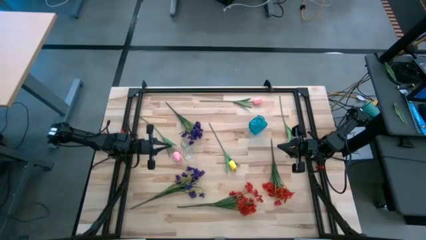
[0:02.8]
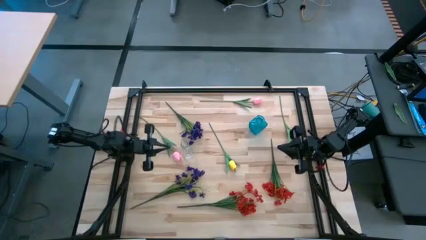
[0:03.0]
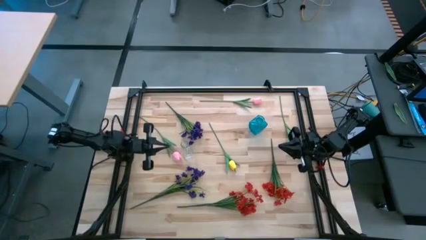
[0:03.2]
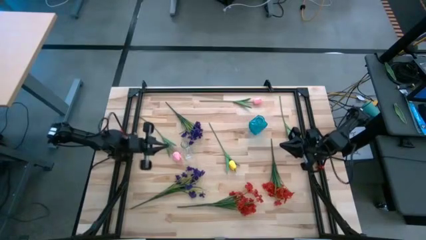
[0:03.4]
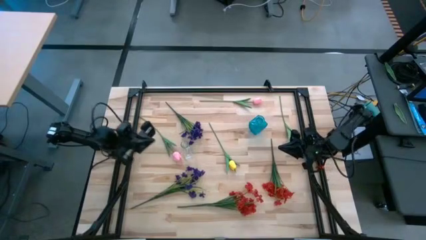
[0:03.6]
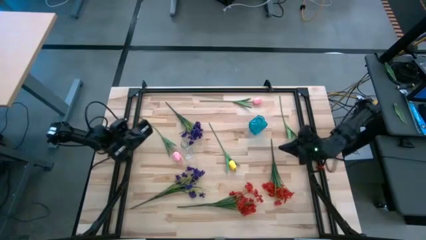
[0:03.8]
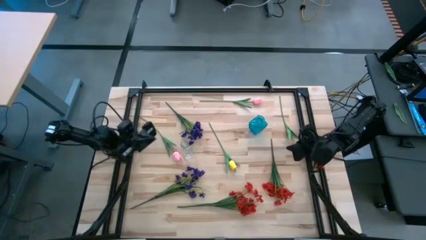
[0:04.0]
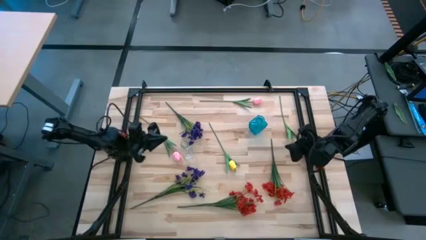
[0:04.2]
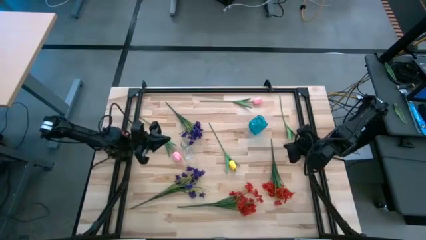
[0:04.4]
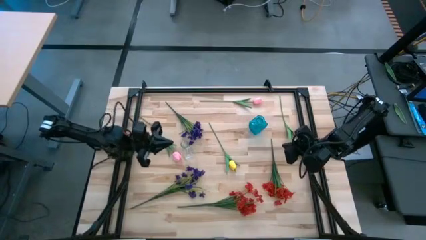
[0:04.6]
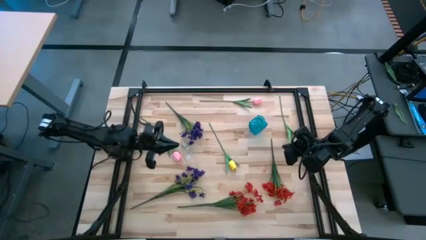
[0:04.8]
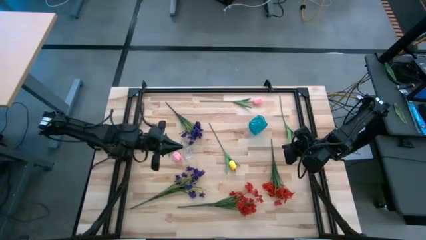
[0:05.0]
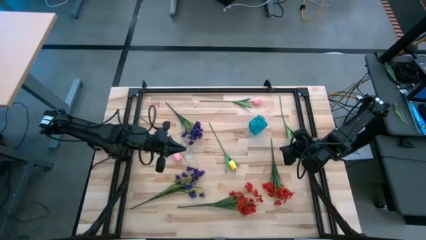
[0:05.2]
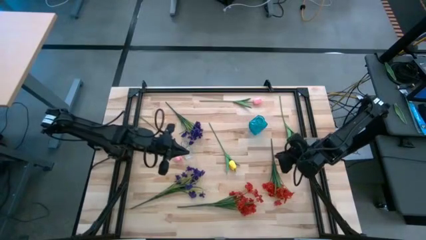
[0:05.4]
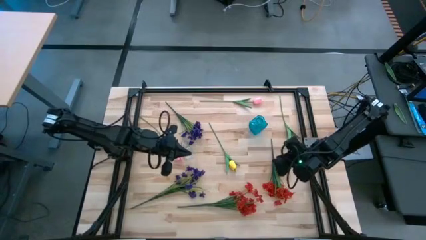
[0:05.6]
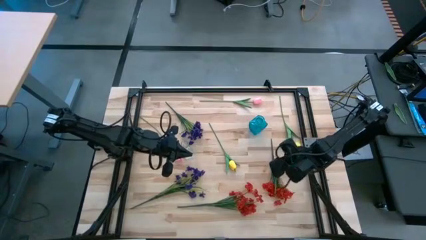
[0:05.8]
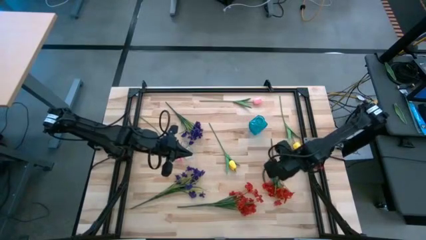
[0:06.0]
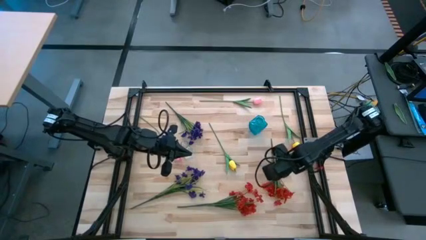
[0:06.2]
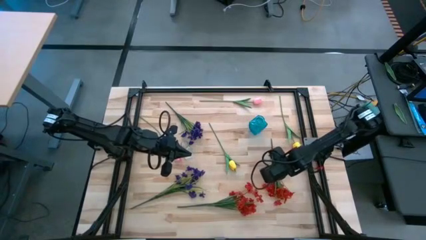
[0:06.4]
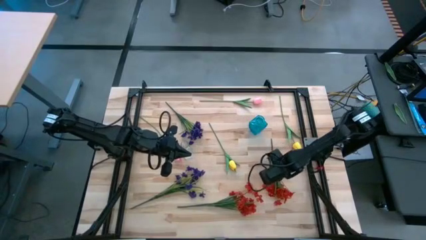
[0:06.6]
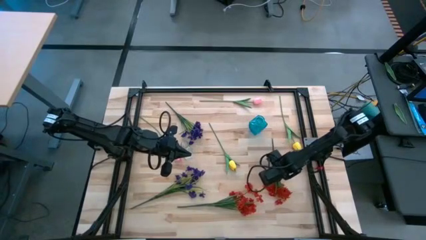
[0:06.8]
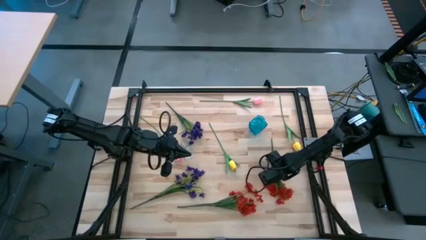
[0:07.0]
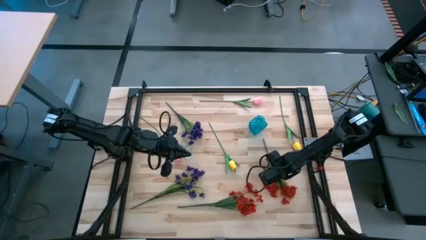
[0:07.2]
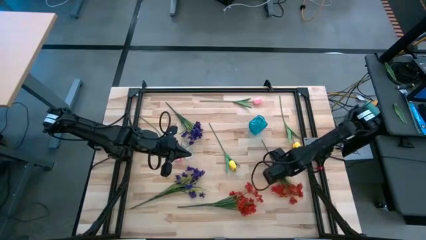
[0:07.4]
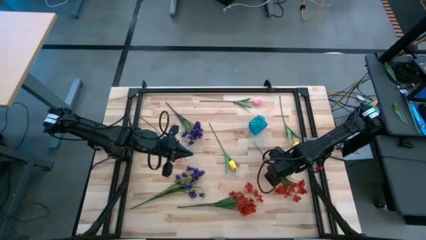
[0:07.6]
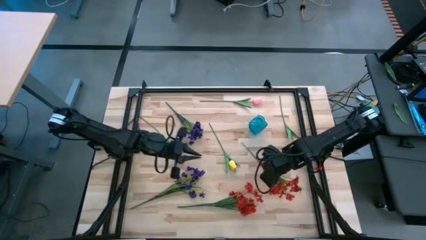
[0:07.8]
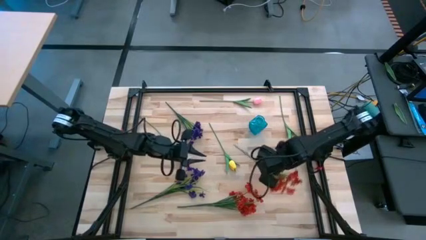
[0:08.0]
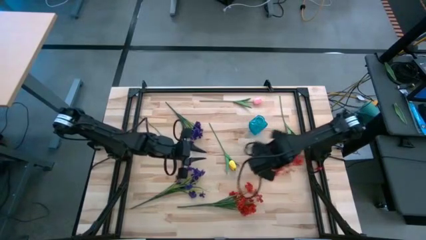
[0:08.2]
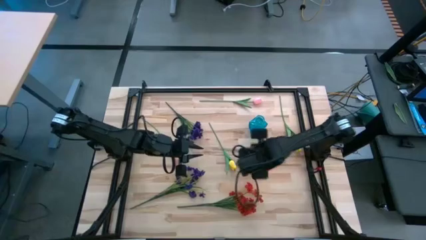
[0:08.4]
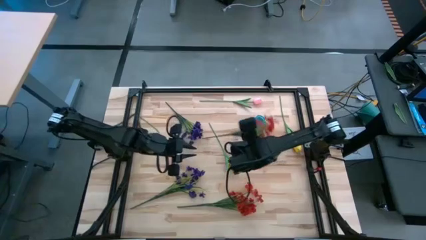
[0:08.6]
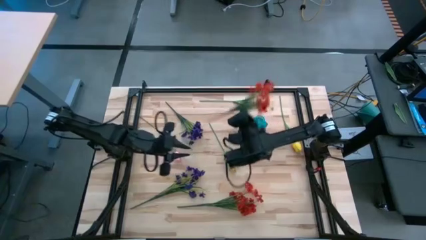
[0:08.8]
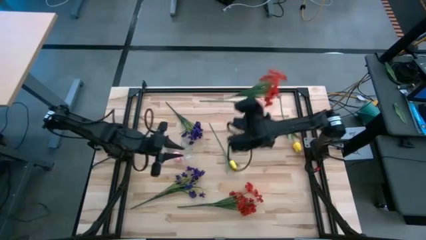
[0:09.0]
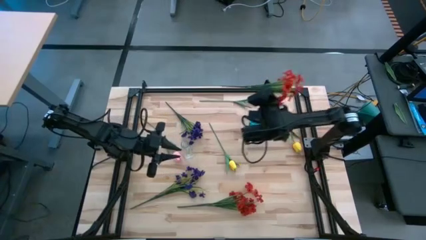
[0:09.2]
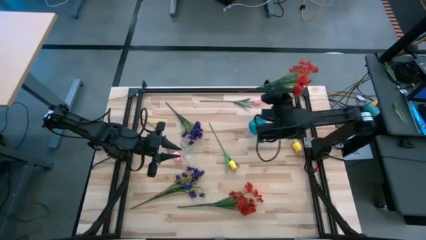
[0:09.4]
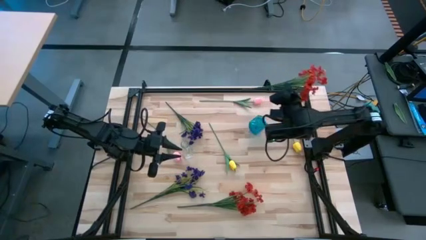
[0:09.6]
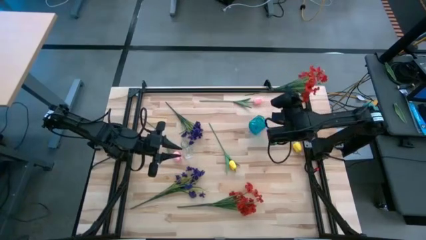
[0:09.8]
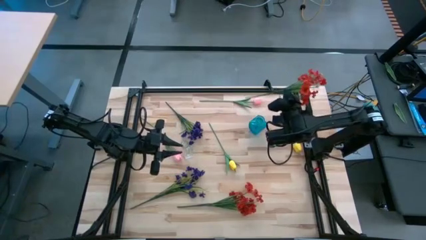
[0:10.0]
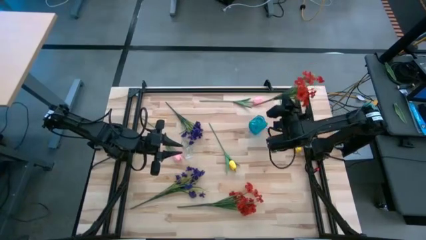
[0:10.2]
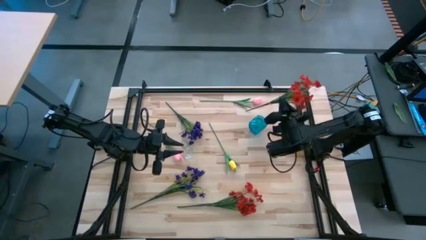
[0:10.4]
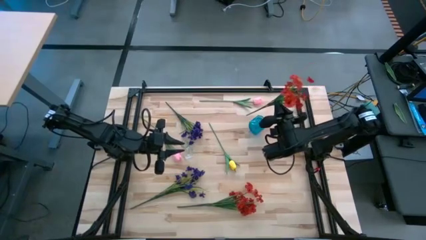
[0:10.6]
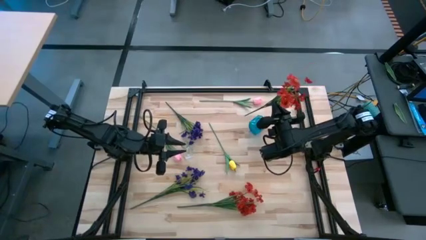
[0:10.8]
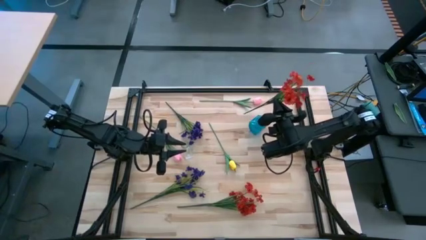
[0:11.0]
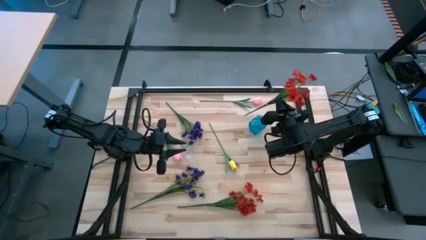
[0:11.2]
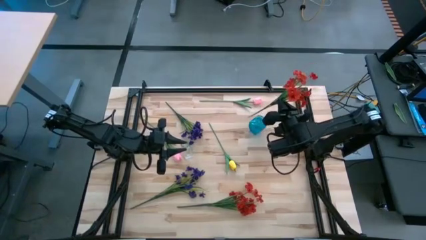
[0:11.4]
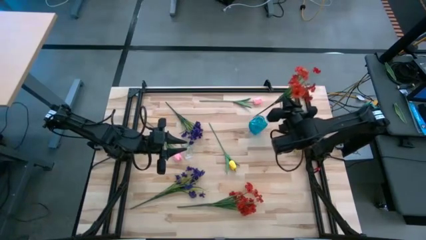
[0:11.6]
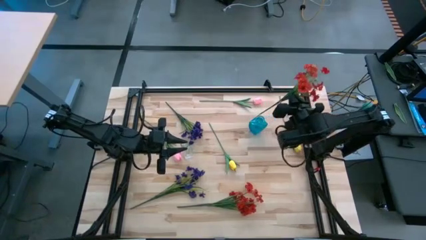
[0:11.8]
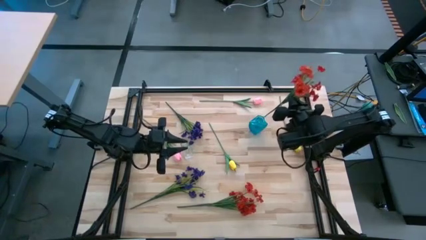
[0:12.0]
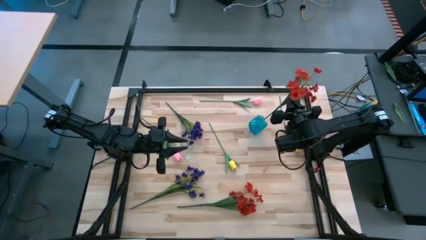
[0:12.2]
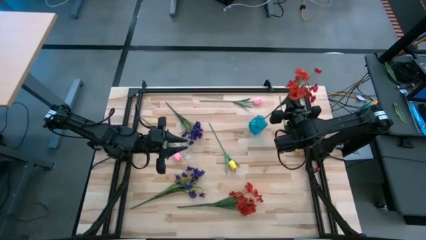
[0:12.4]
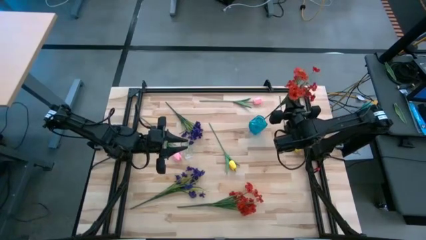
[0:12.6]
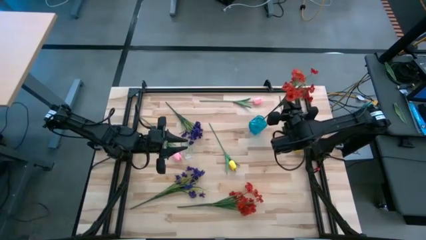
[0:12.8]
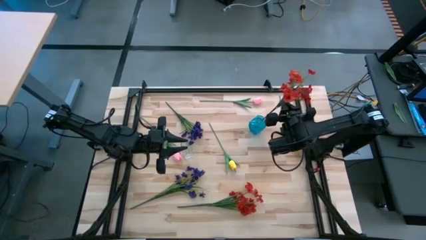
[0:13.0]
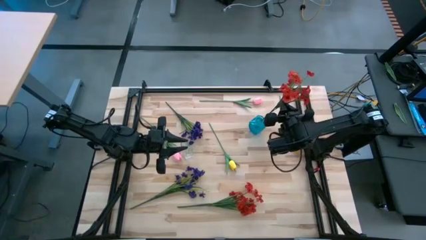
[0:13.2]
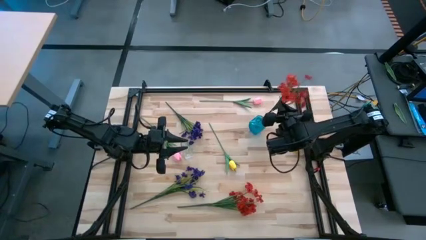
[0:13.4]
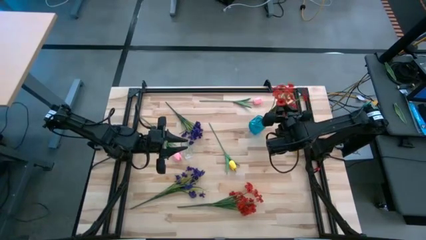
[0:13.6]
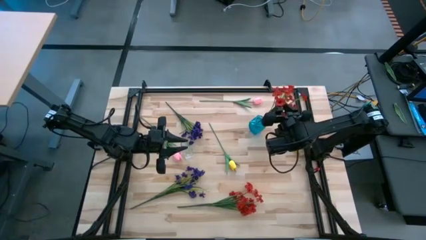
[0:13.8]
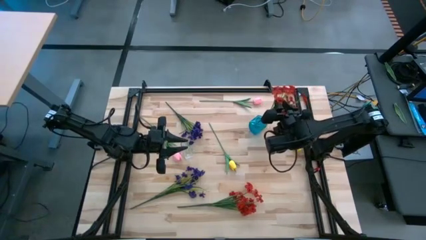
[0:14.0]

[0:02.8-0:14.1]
Task: Sort flowers into vase by color
Put the right red flower into the blue vase

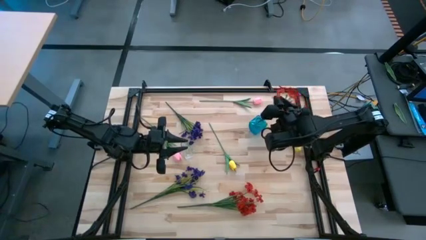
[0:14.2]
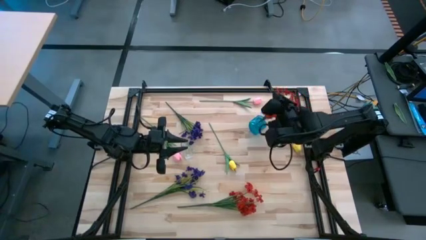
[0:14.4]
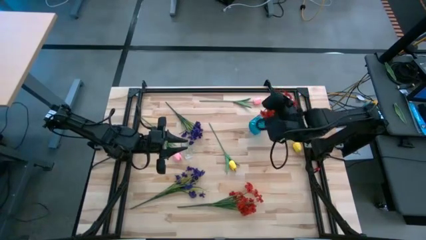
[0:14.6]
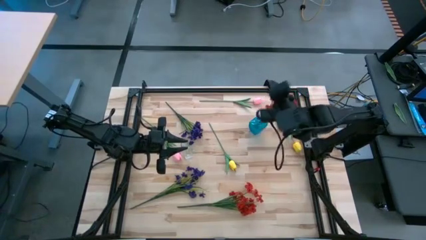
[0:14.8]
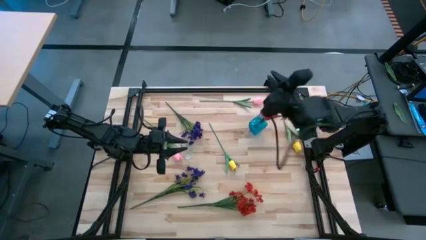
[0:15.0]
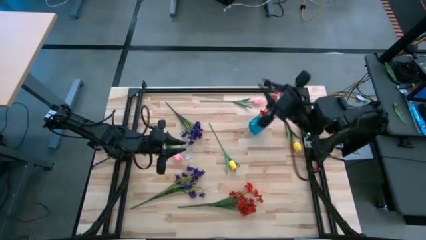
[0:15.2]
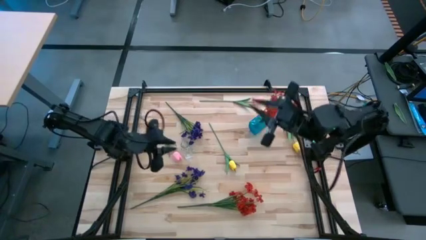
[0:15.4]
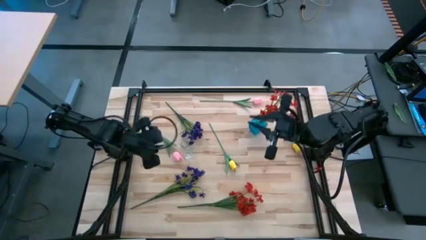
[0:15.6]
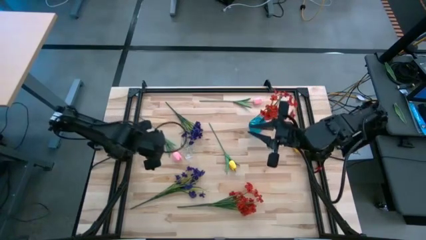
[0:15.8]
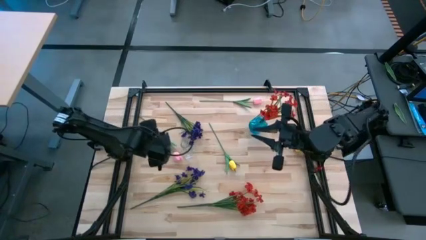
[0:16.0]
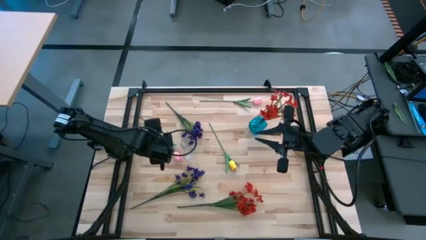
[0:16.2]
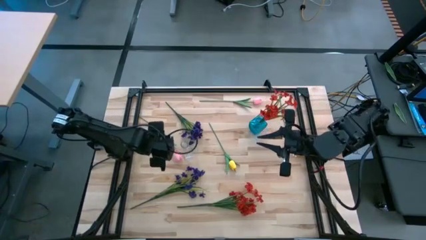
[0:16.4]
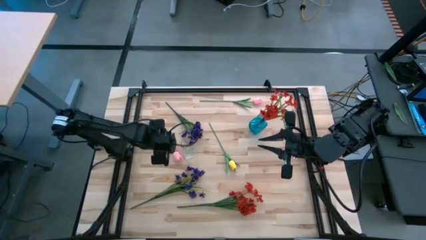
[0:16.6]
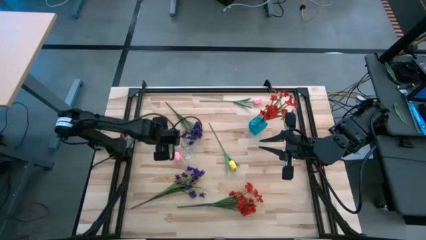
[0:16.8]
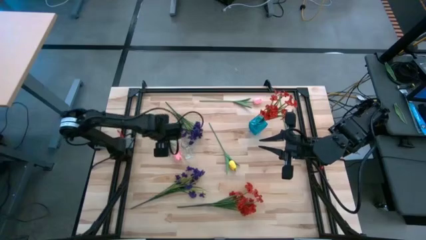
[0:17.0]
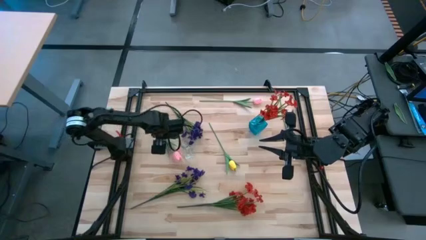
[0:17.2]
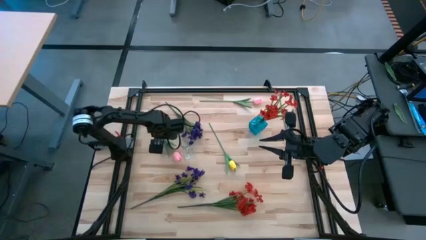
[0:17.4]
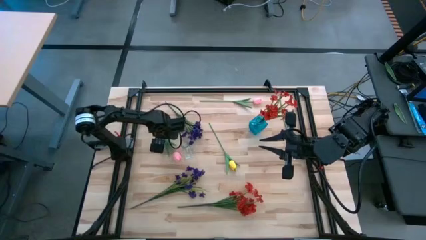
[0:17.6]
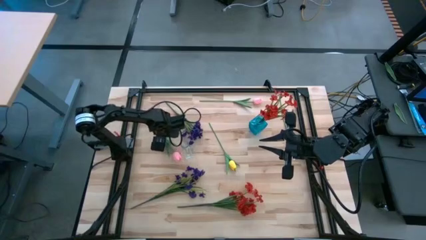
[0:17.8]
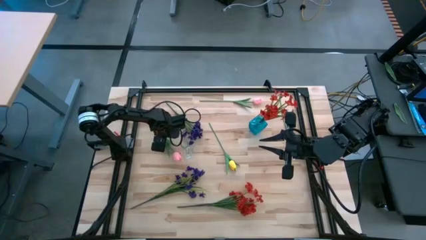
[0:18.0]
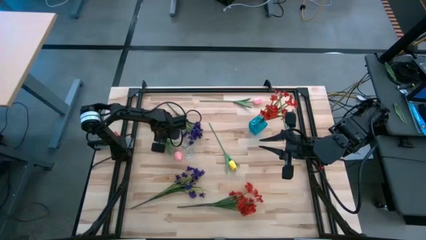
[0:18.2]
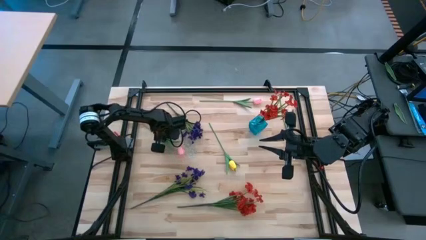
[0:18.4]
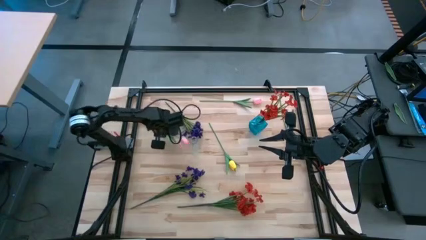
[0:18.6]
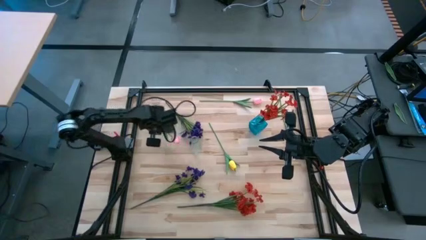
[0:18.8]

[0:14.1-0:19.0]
Put the bottom pink tulip into the transparent vase
